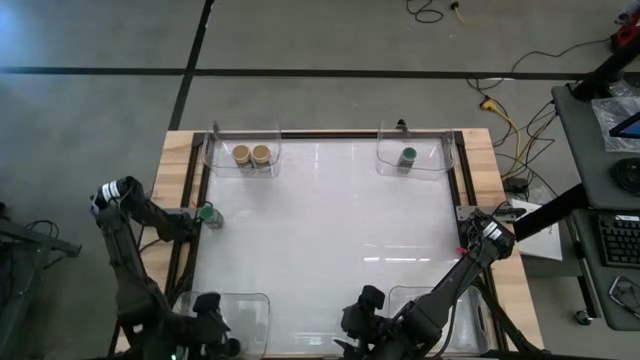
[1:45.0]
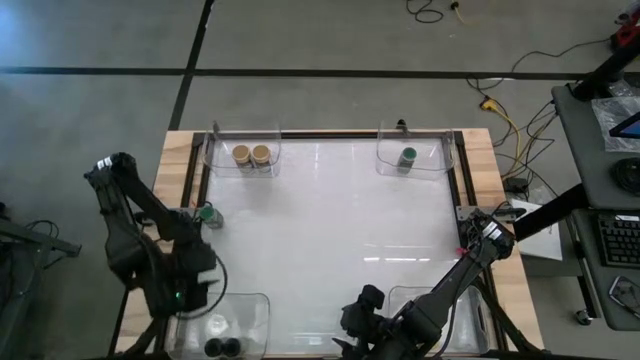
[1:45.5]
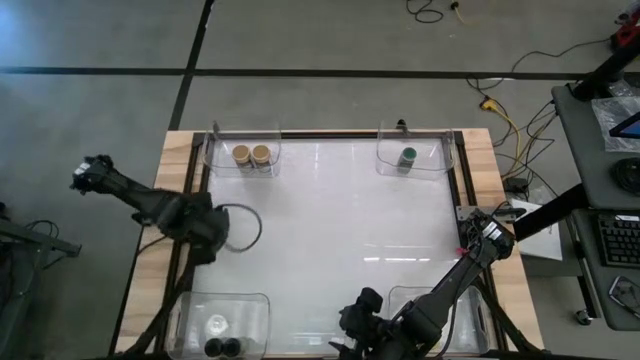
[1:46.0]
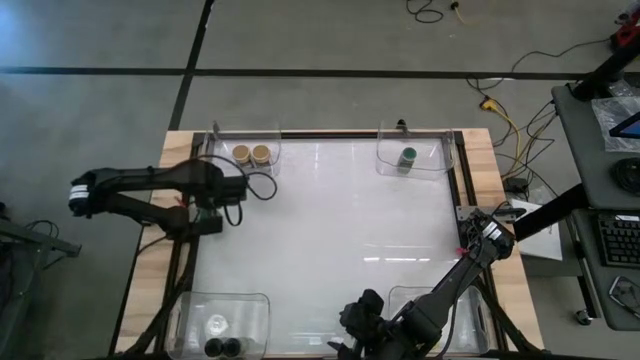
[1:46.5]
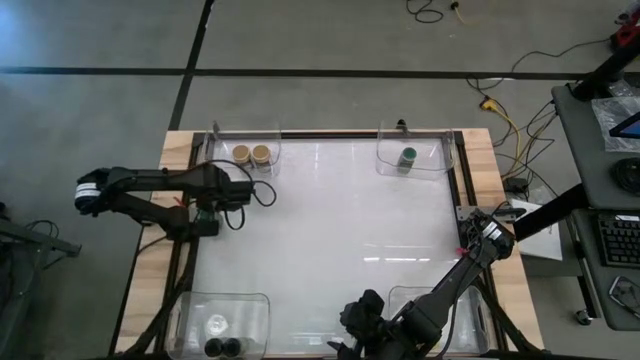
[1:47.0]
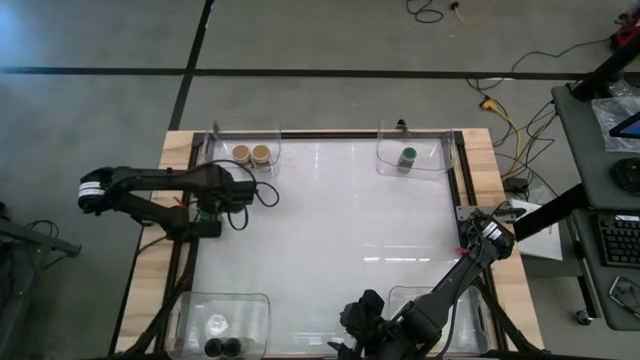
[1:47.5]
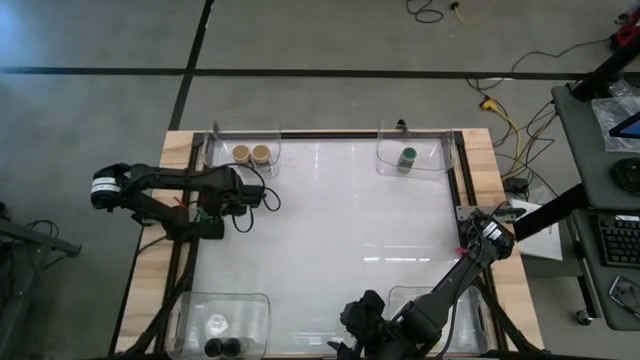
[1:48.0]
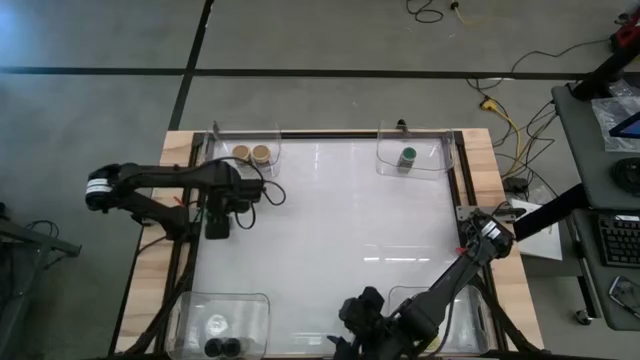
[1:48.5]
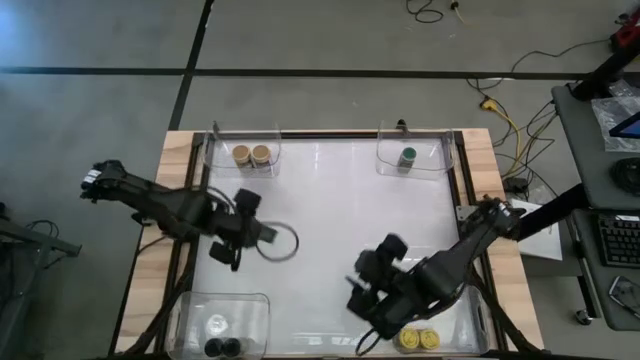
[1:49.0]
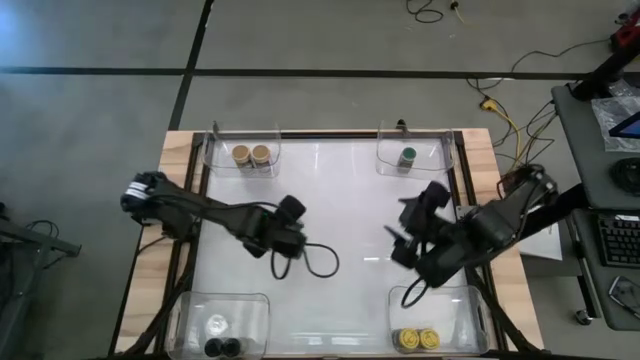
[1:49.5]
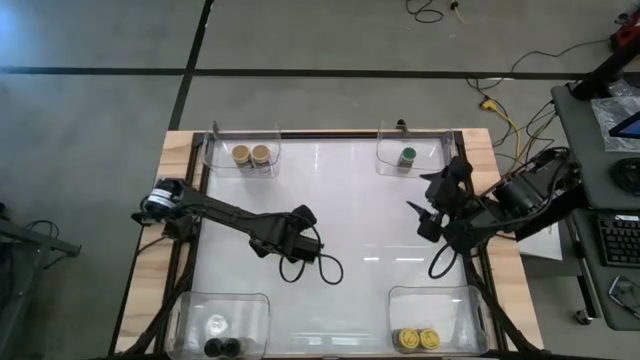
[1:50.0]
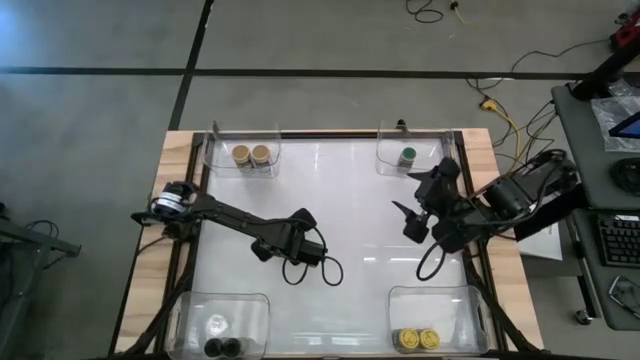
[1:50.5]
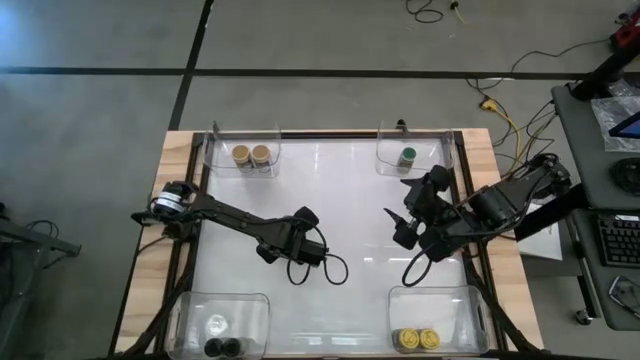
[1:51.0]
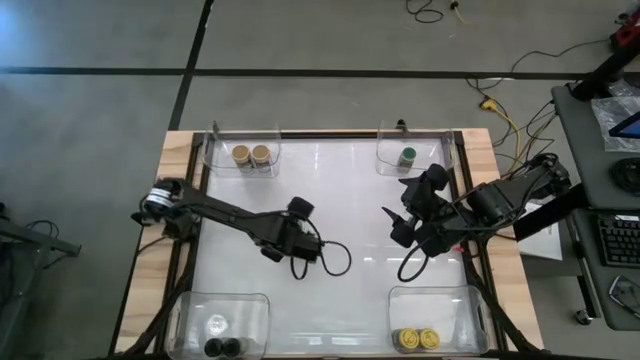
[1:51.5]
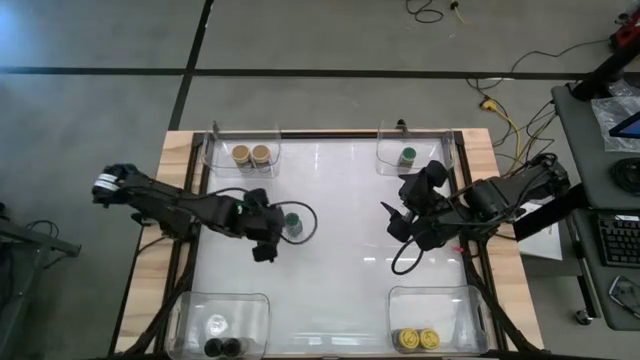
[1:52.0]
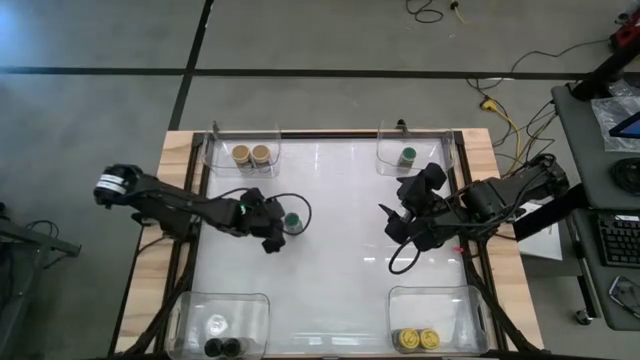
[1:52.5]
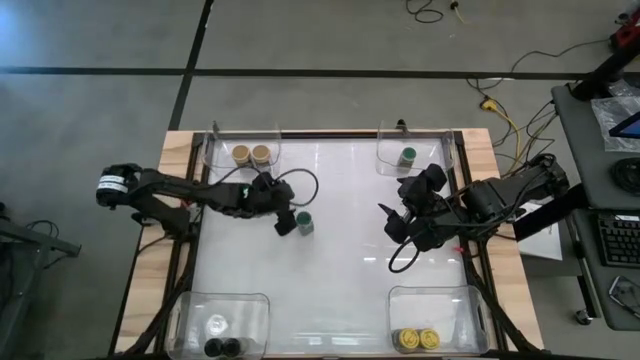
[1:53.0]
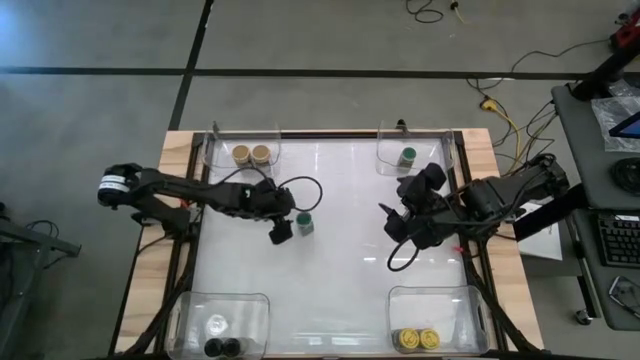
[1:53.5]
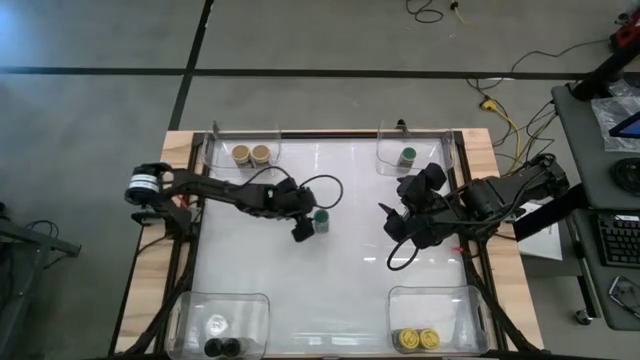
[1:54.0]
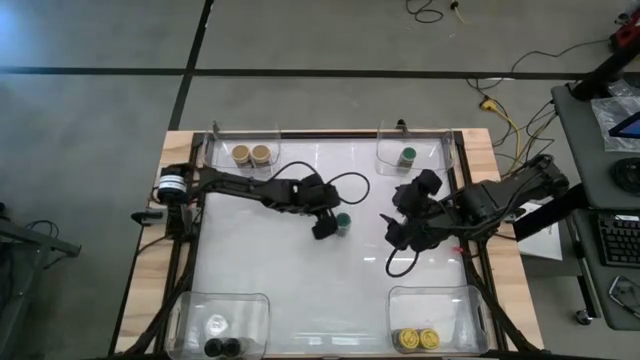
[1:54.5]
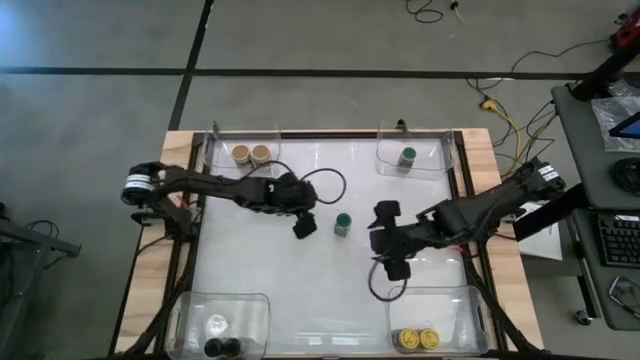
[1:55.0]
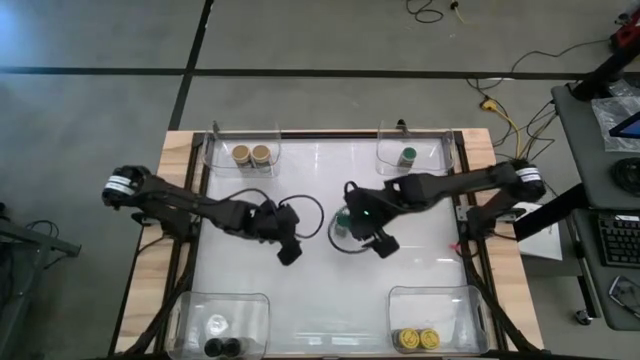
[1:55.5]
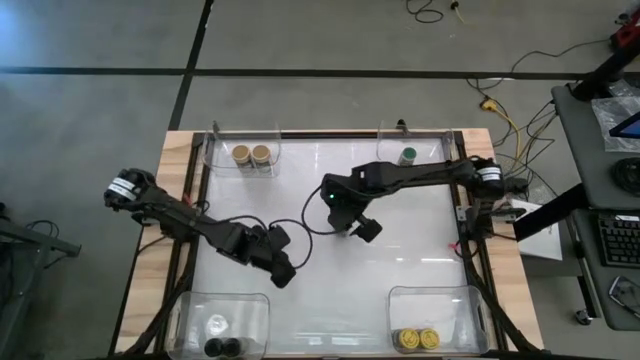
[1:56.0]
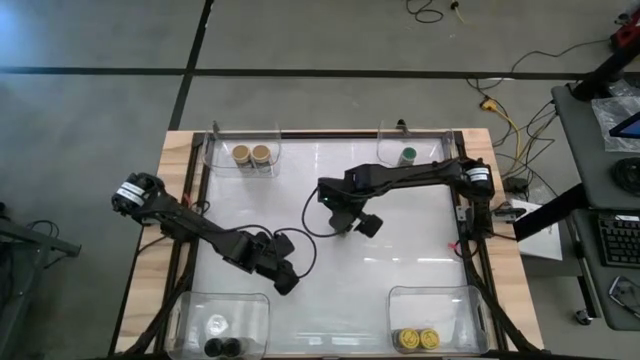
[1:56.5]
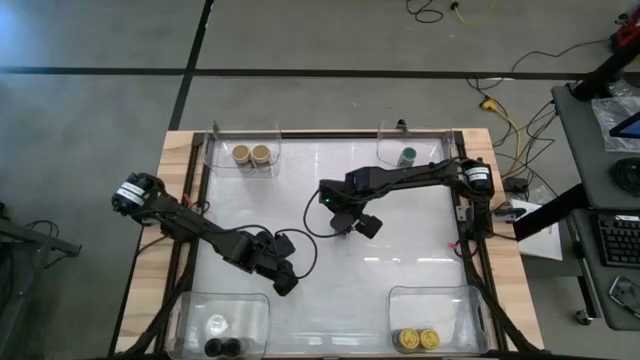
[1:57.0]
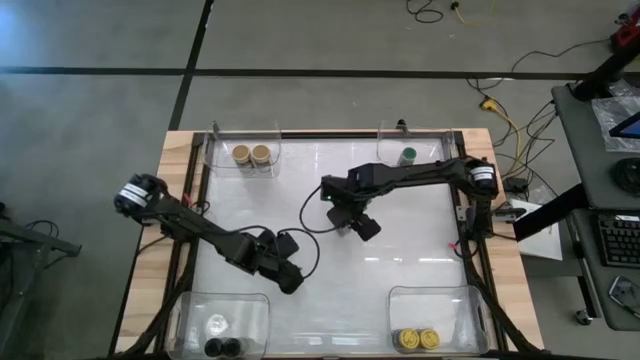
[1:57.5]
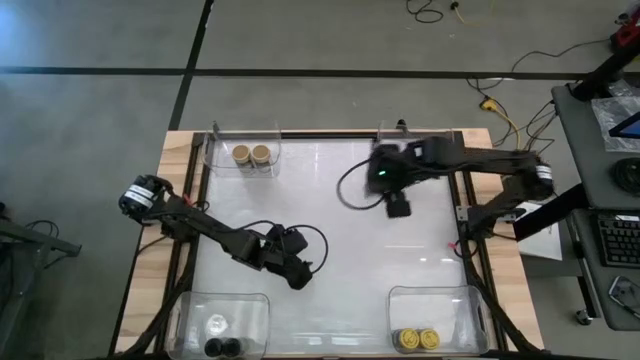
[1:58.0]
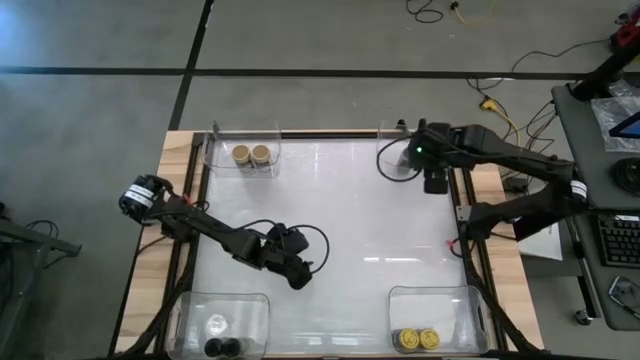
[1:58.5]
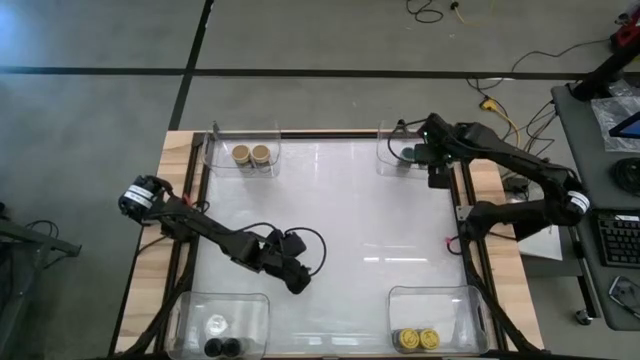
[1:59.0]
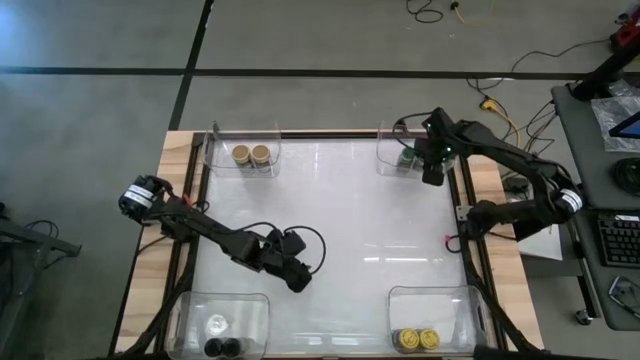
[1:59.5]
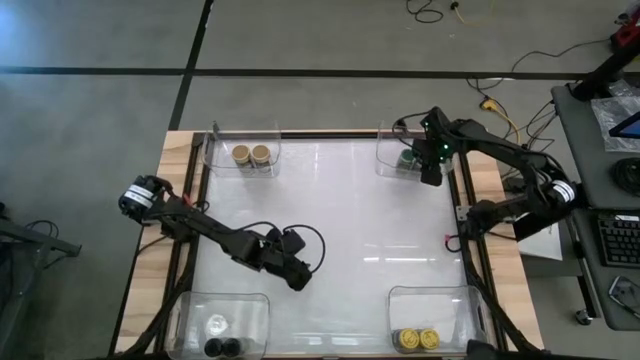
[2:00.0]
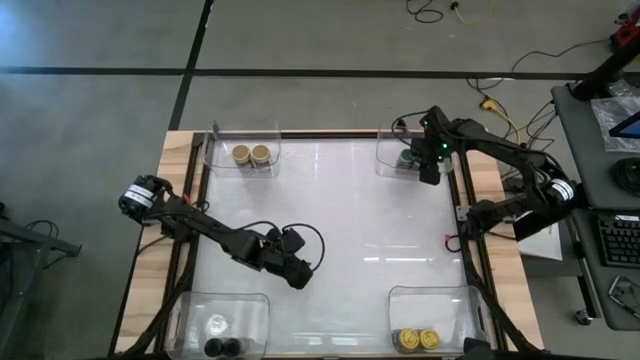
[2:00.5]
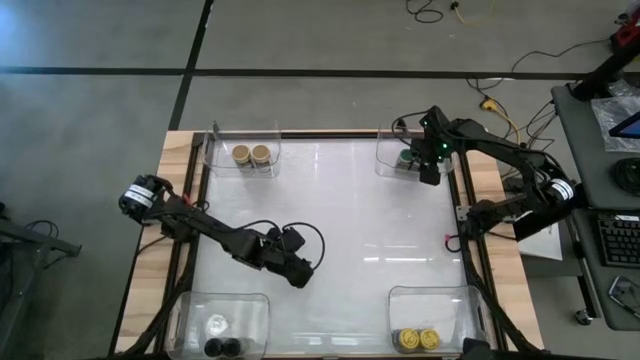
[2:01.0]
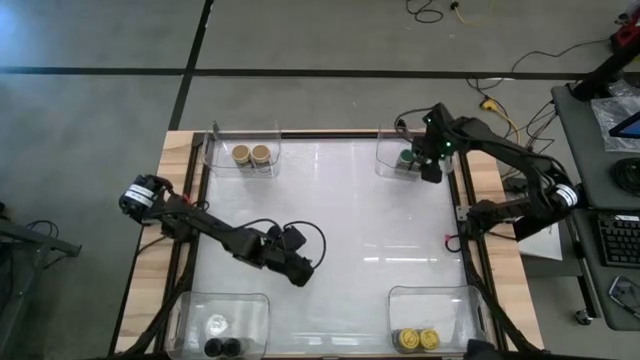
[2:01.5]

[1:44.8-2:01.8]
Task: Sort spices by type
Put the green seasoning bottle into the top right transparent bin

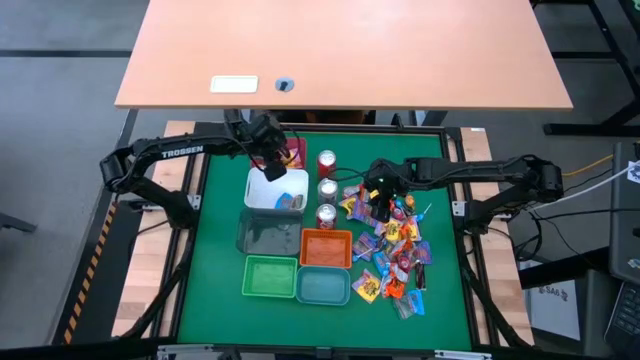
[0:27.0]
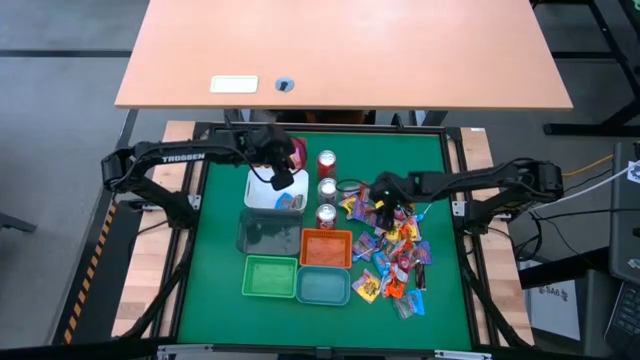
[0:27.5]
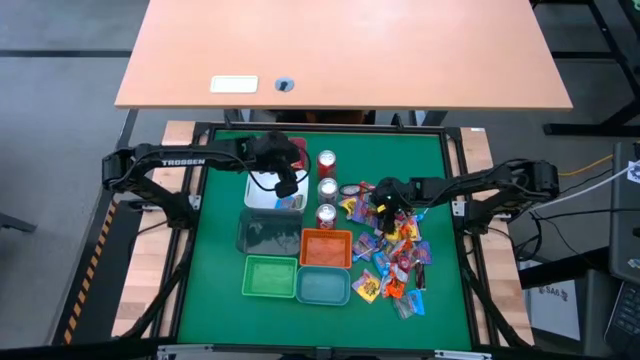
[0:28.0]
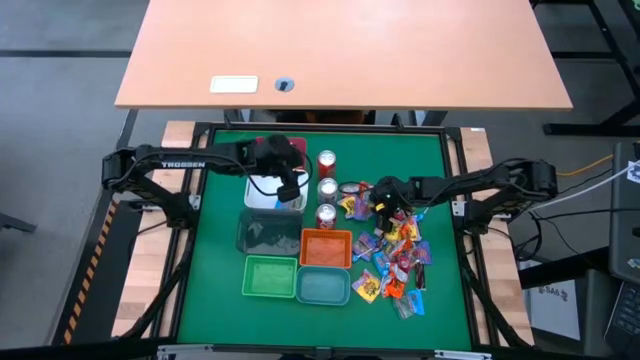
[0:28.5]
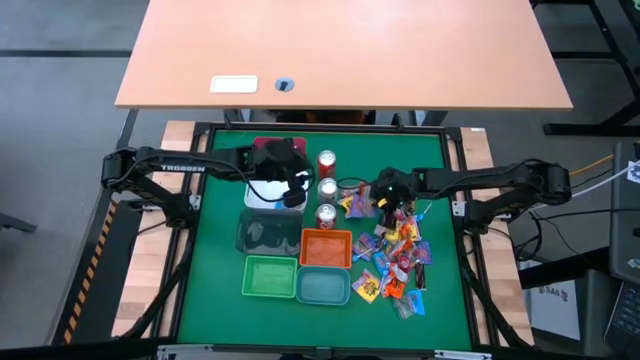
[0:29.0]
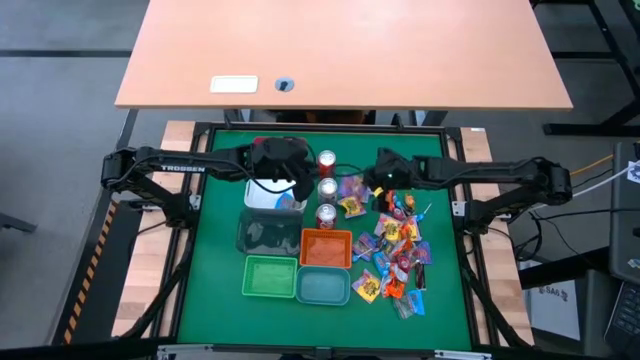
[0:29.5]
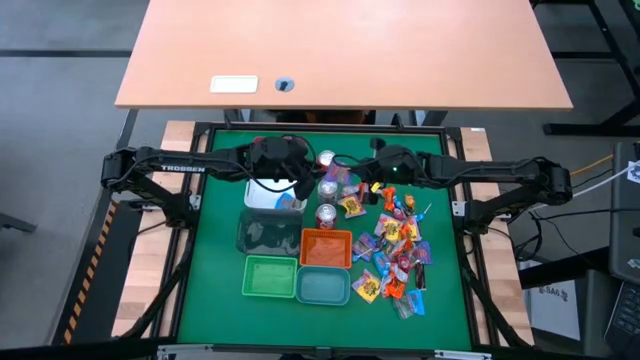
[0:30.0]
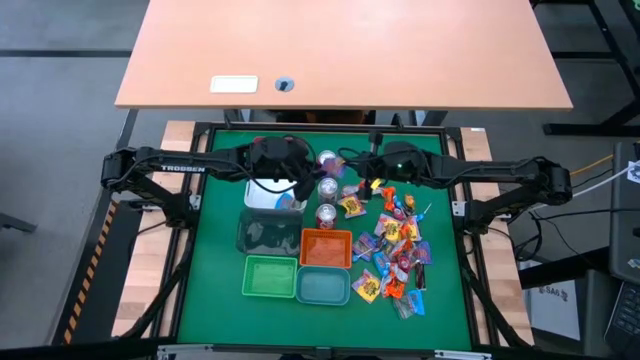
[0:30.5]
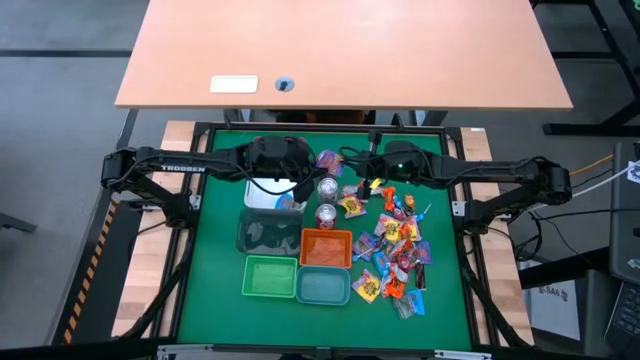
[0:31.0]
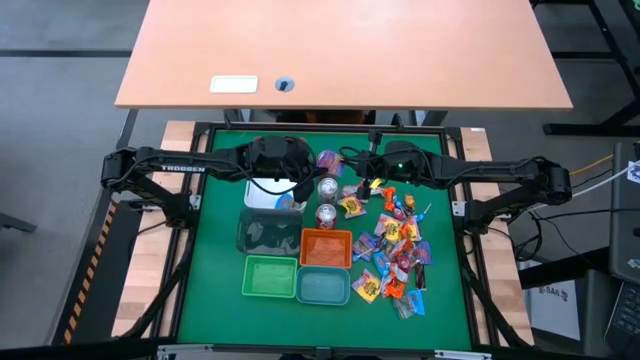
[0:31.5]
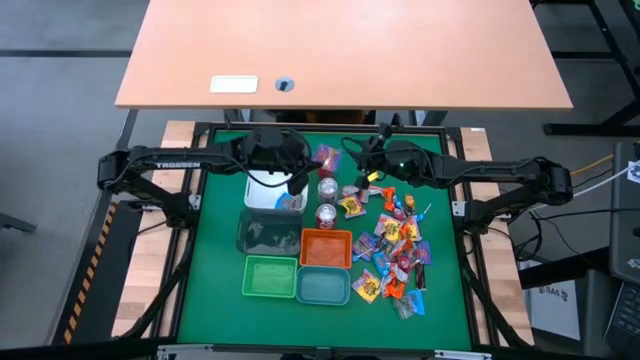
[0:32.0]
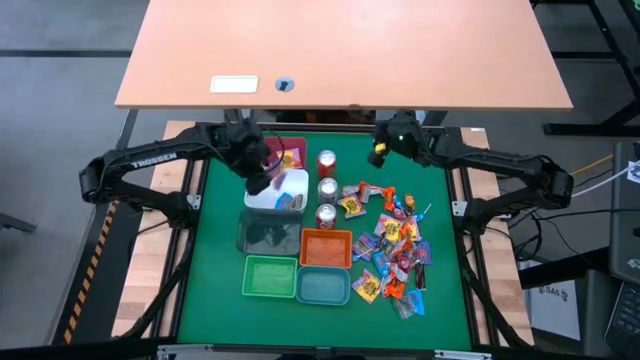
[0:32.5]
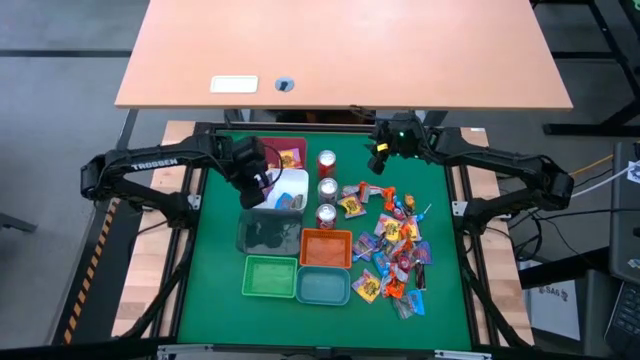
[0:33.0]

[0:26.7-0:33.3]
Task: Sort candy
Put the violet candy into the white bin
